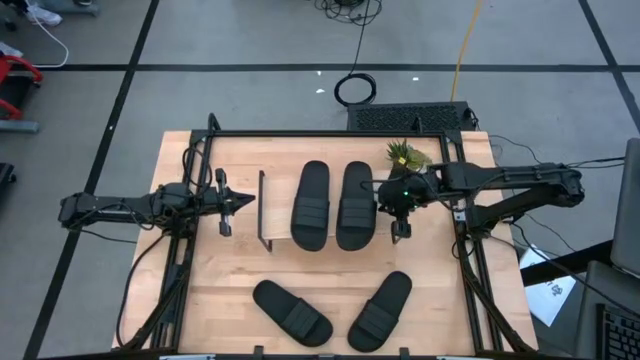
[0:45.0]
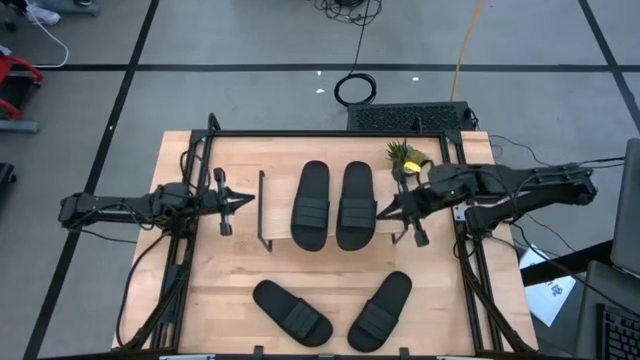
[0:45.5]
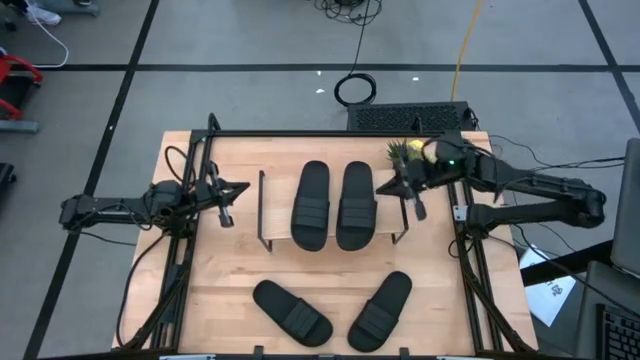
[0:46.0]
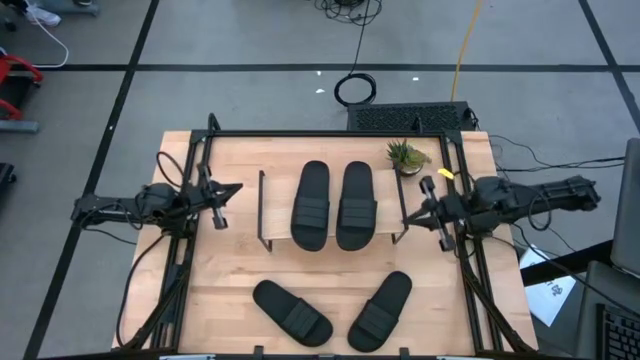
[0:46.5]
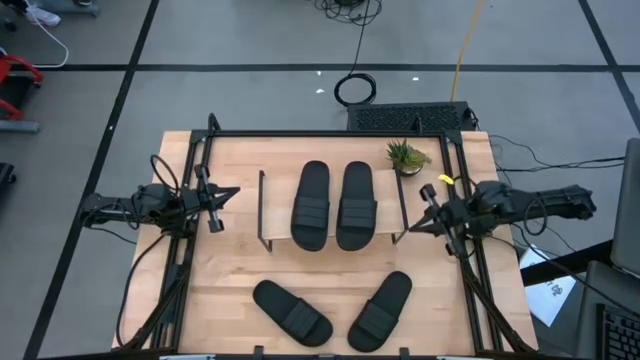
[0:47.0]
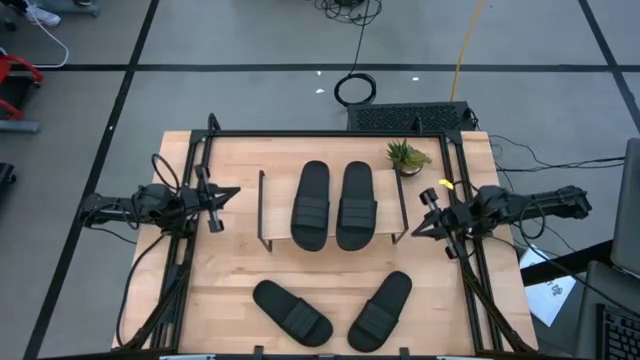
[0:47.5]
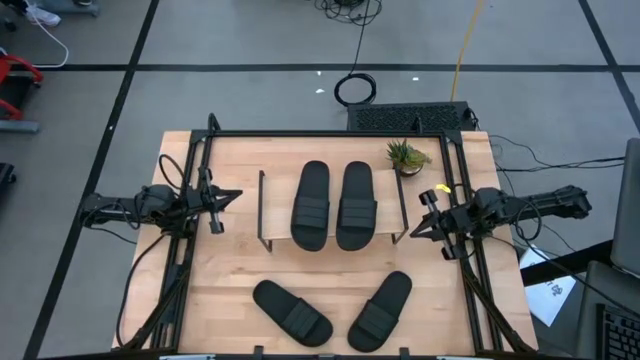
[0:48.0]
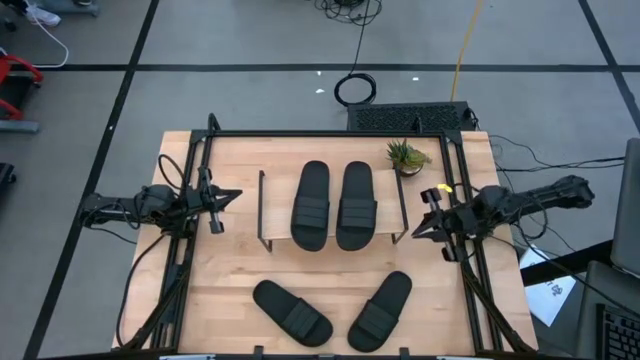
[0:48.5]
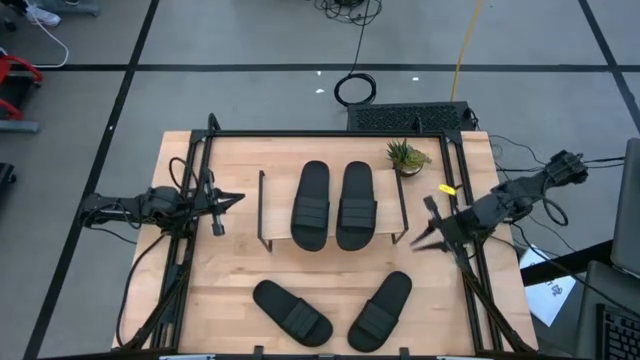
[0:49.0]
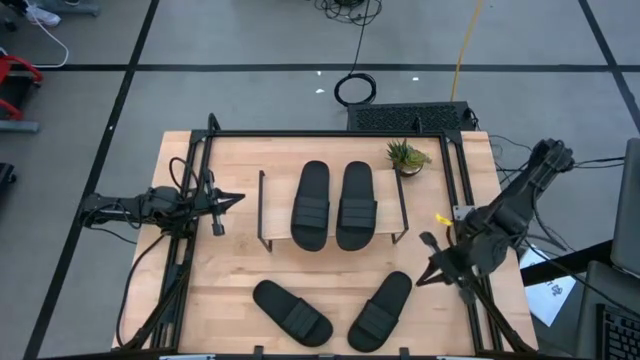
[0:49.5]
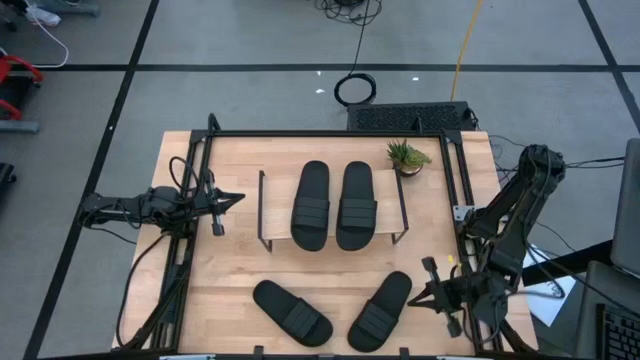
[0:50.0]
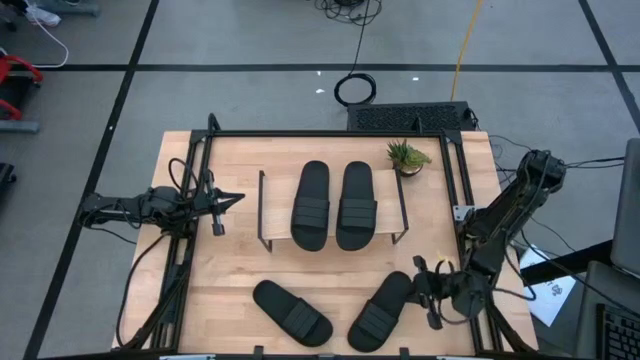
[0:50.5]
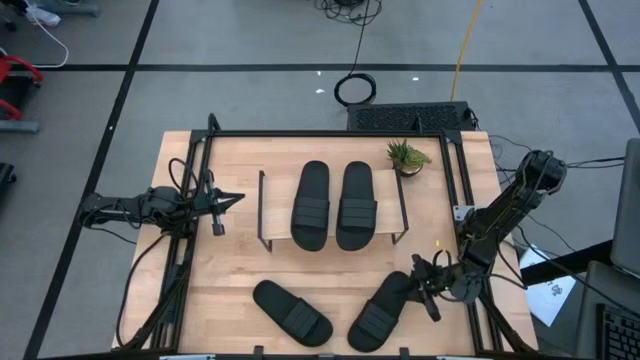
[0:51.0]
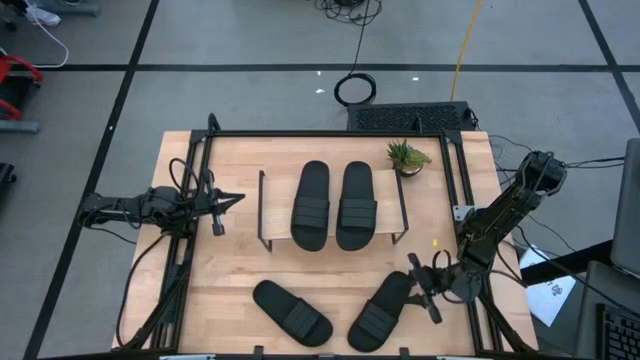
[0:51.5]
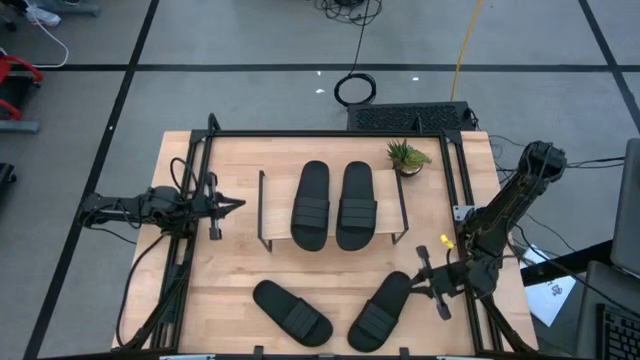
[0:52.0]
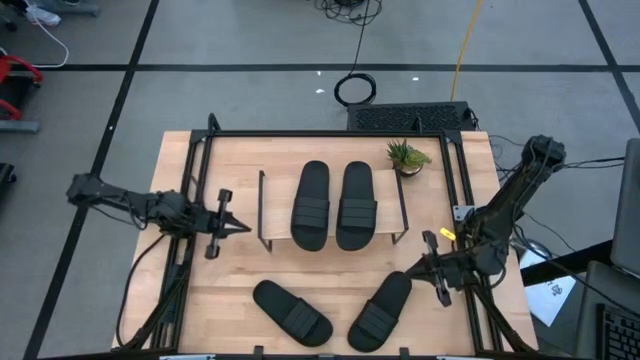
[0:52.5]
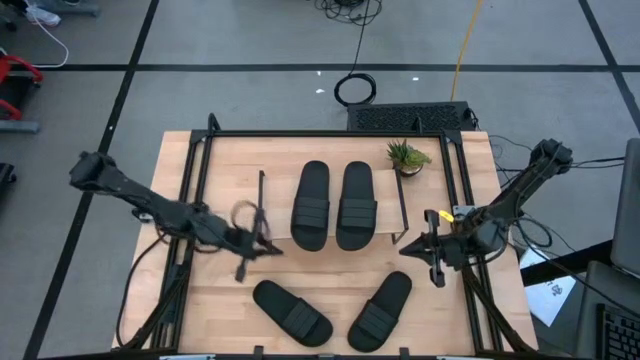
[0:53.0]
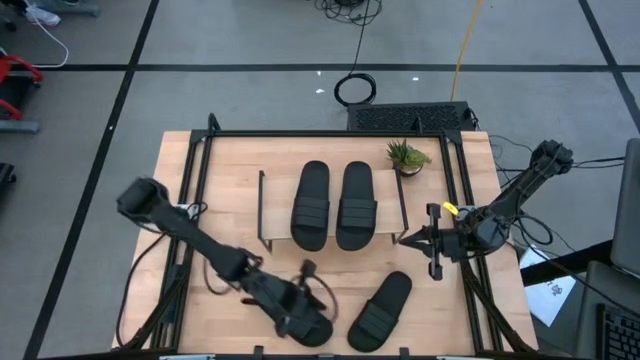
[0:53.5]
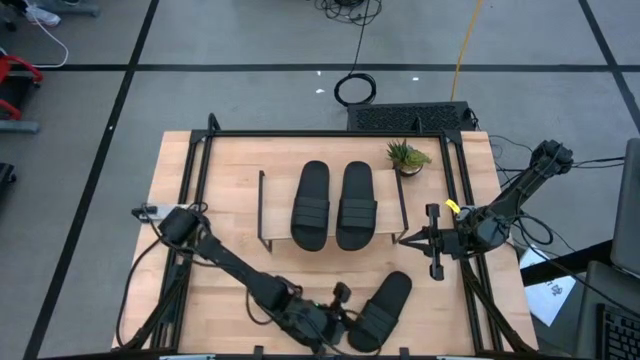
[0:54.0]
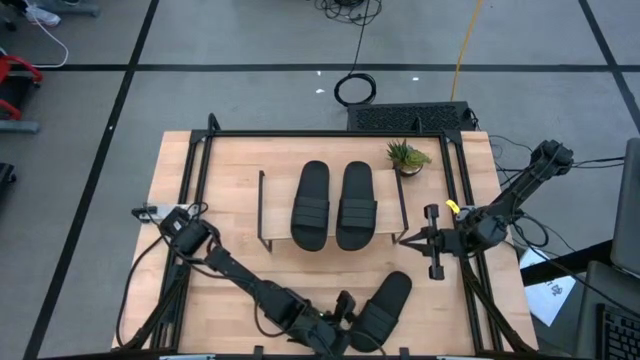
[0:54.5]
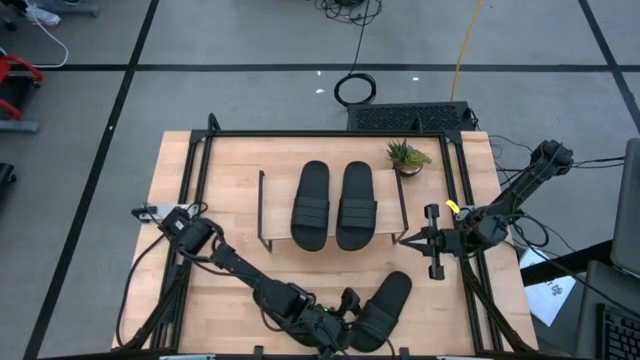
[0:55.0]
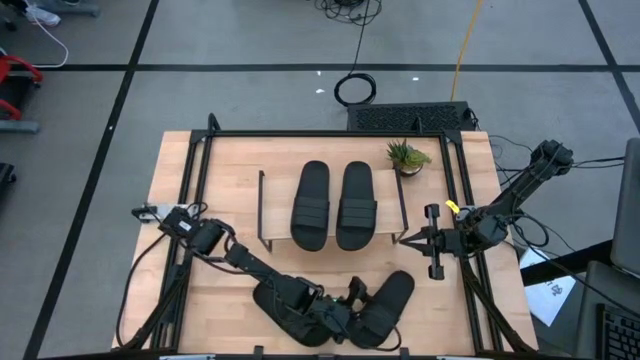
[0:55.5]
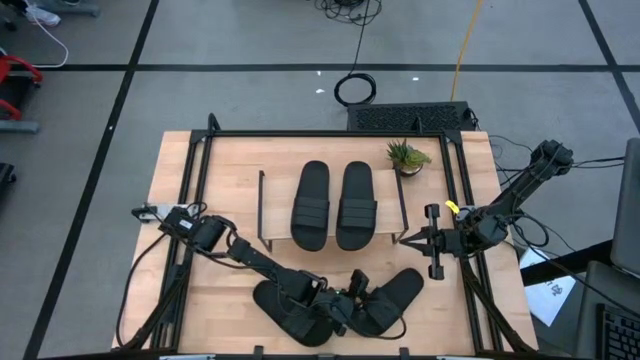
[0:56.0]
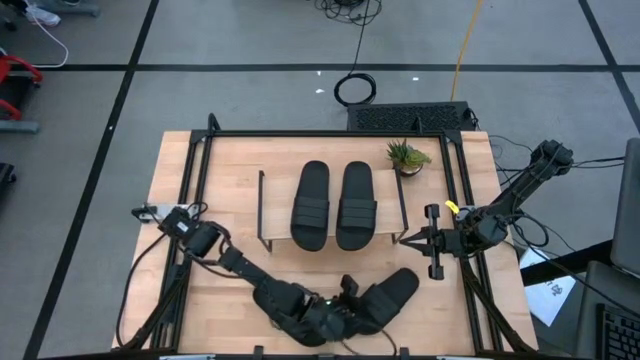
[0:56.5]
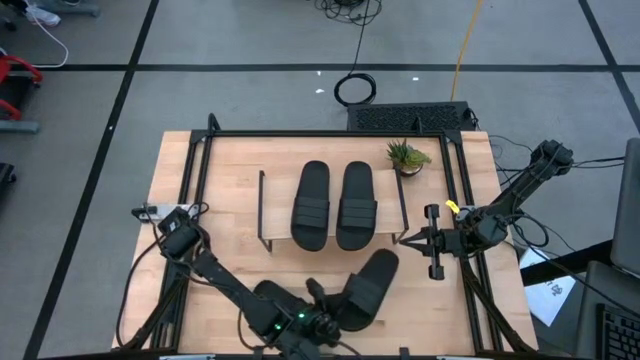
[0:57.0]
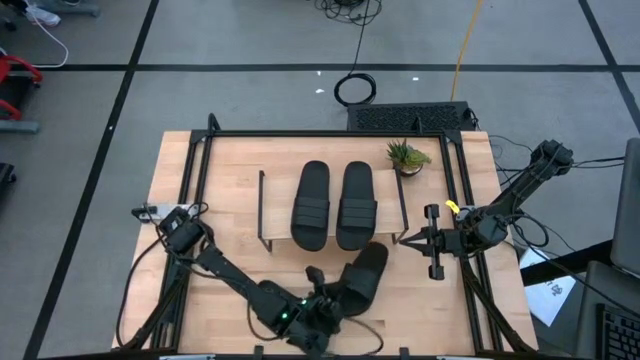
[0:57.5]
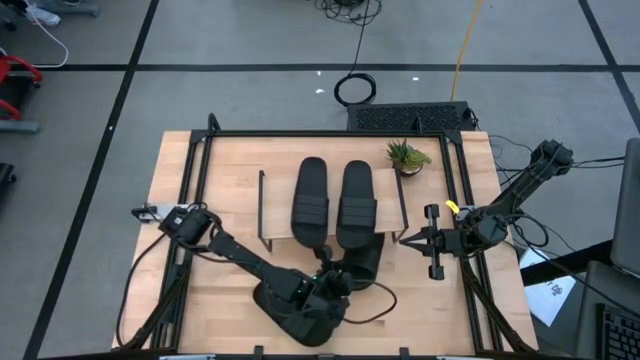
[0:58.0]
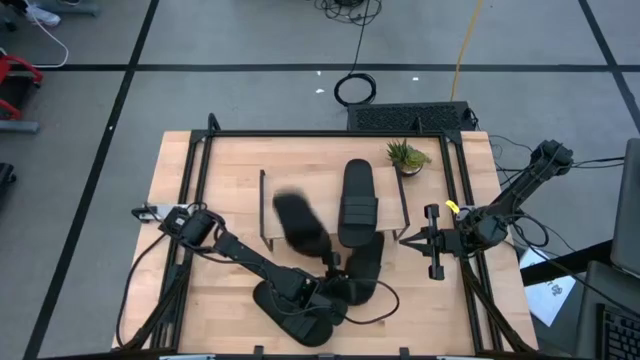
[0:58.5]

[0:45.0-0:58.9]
Task: Pick and place slides into the shelf
Move the black slide under the shelf

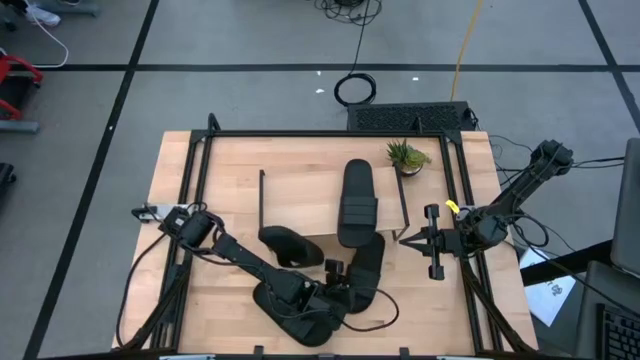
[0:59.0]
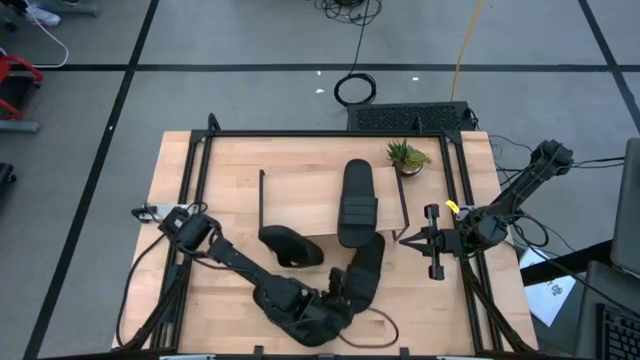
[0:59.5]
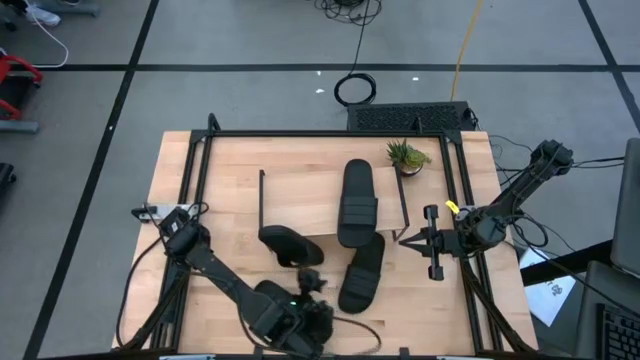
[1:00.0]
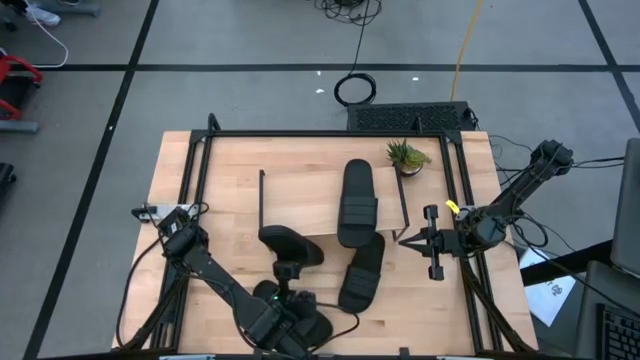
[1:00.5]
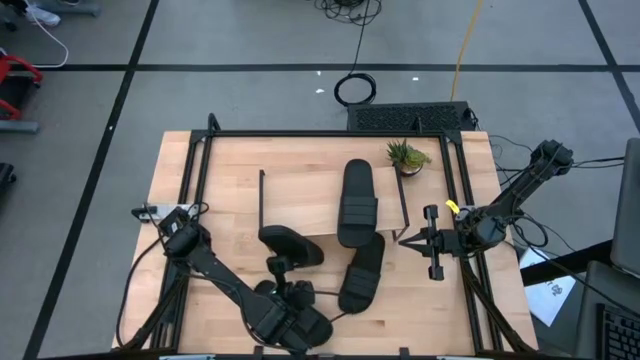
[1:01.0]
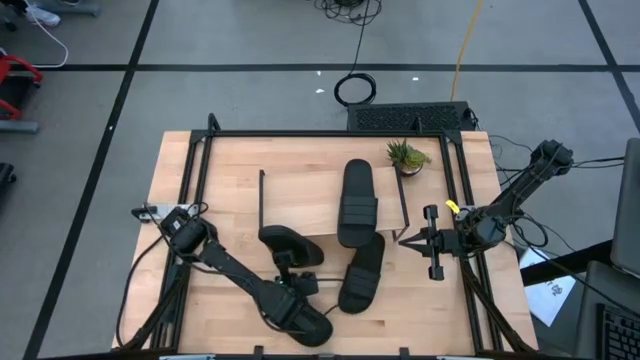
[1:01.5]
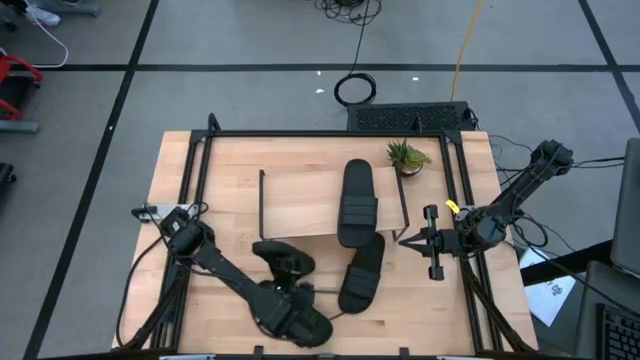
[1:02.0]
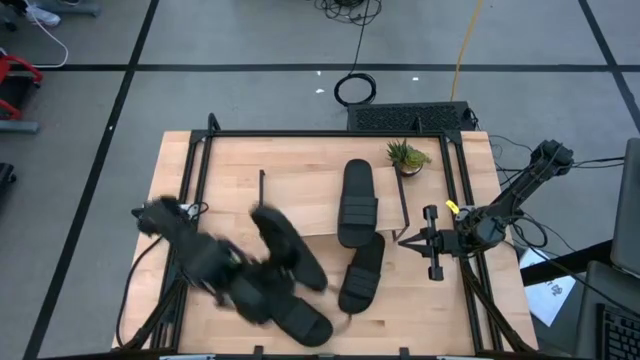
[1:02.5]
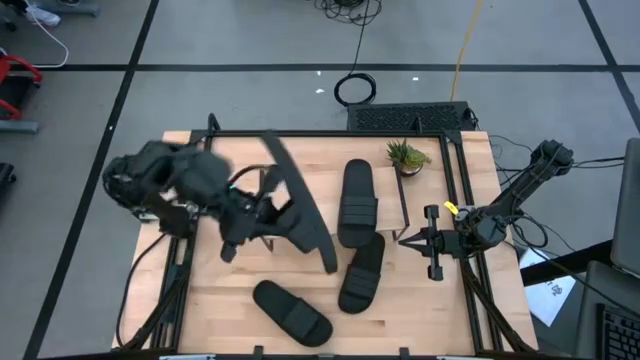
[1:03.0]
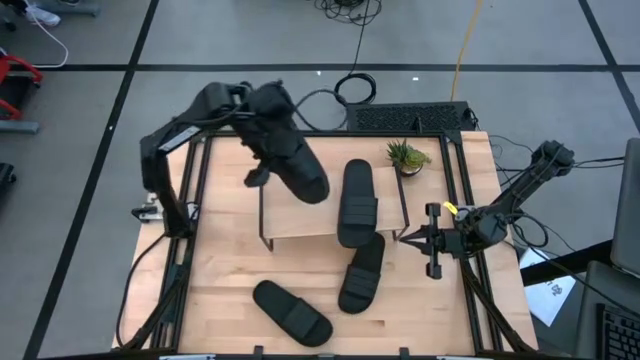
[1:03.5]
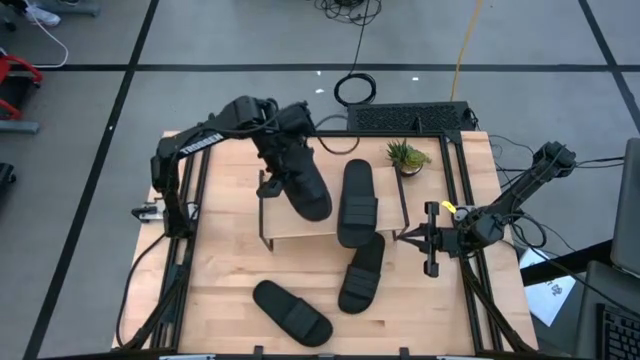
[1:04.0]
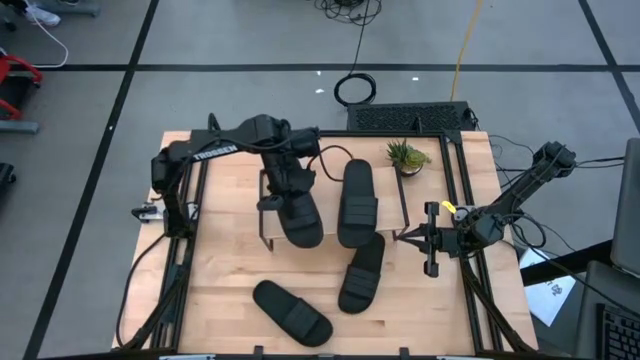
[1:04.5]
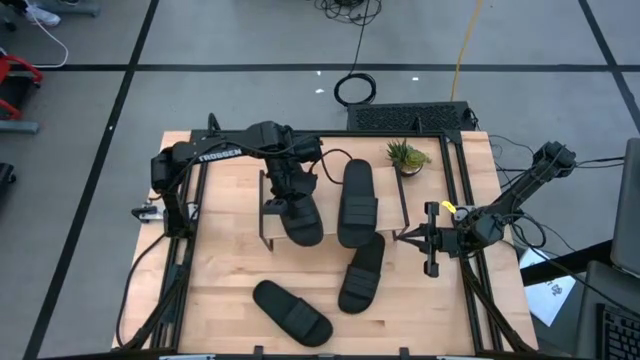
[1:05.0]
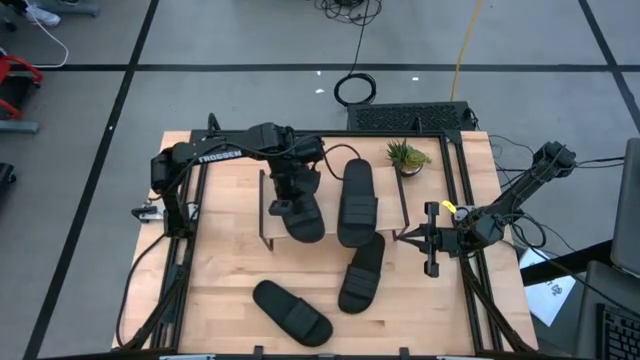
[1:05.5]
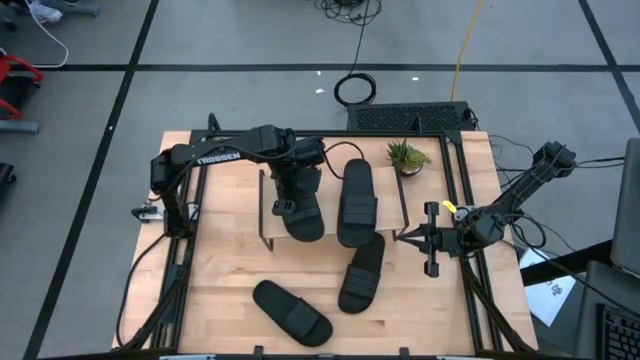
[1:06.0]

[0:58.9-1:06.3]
Put the black slide on the shelf
